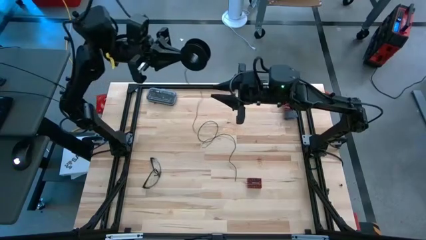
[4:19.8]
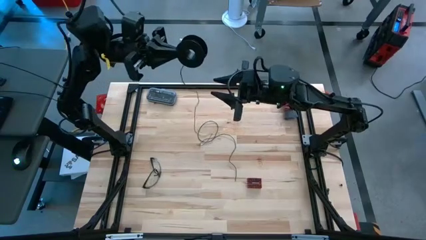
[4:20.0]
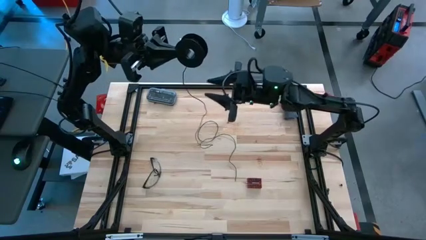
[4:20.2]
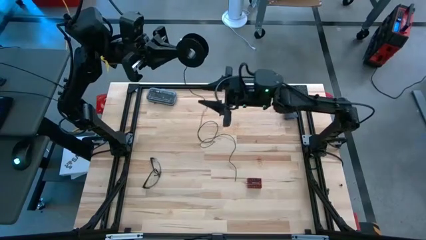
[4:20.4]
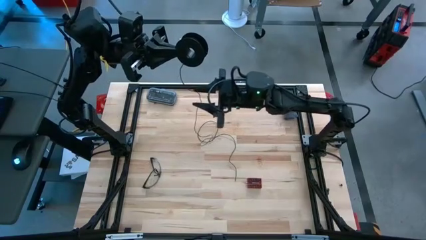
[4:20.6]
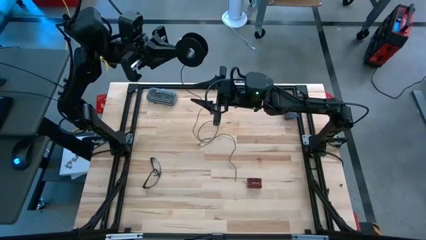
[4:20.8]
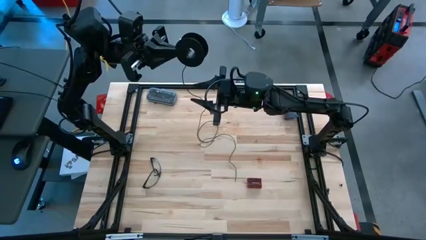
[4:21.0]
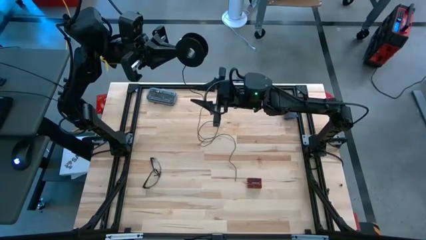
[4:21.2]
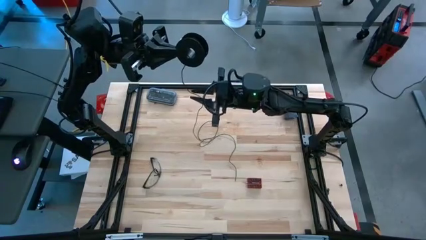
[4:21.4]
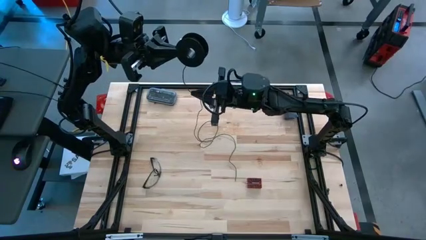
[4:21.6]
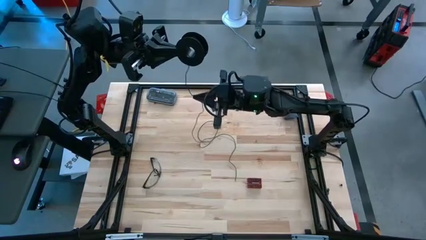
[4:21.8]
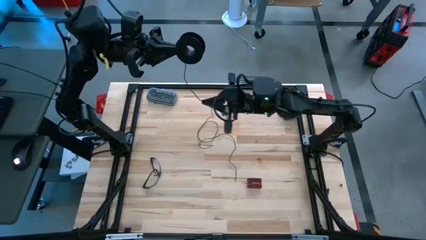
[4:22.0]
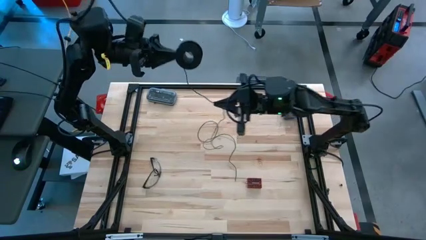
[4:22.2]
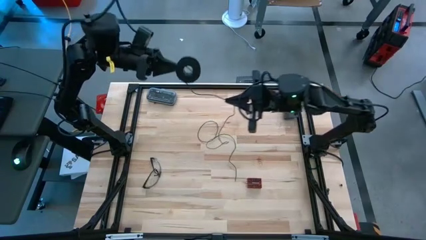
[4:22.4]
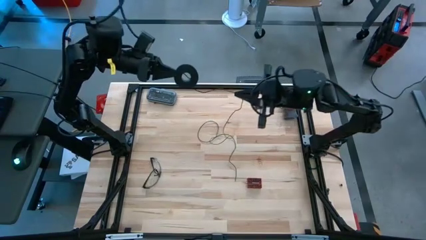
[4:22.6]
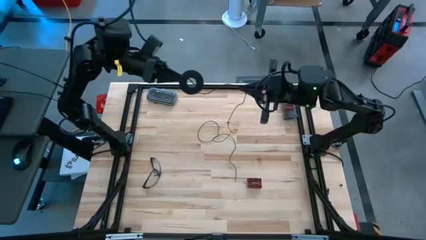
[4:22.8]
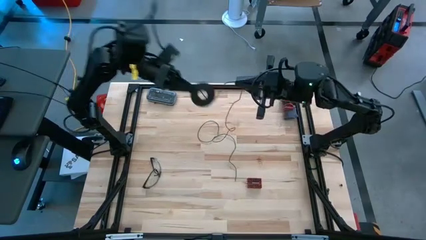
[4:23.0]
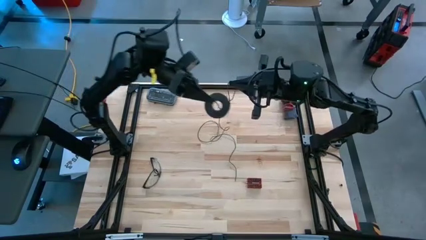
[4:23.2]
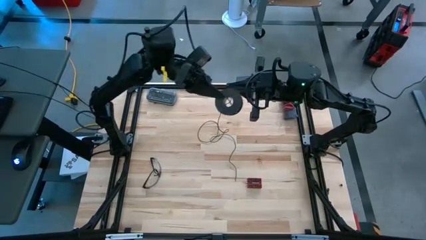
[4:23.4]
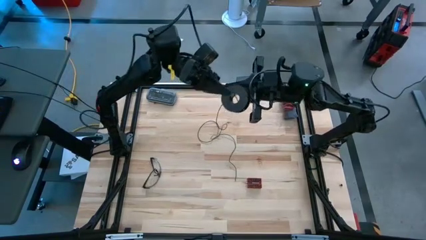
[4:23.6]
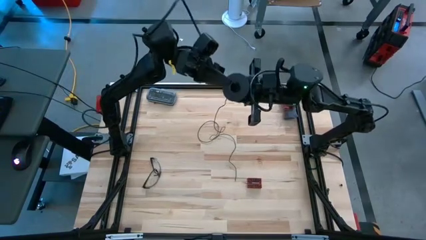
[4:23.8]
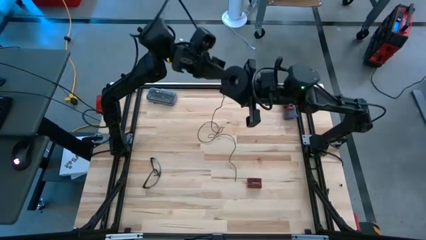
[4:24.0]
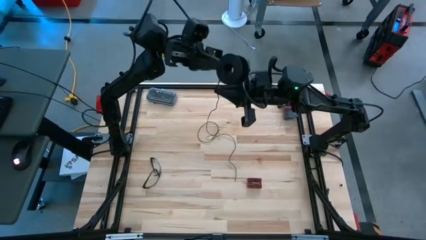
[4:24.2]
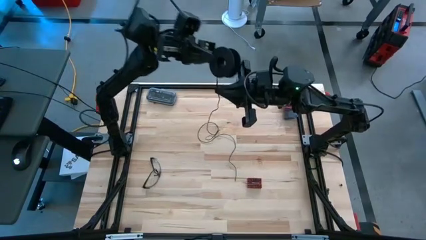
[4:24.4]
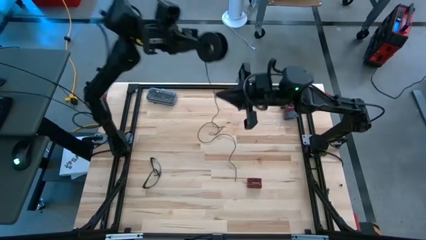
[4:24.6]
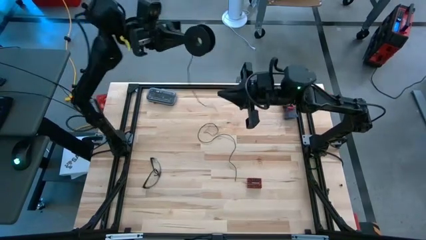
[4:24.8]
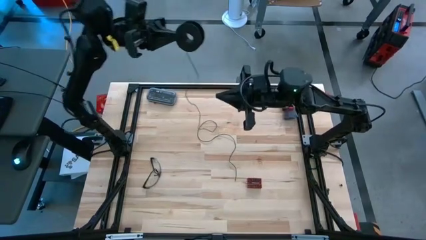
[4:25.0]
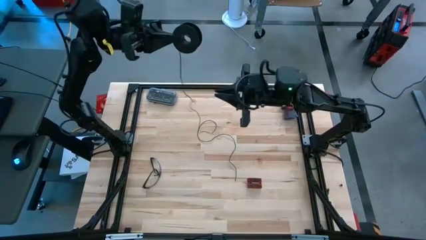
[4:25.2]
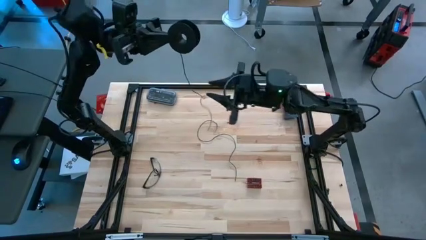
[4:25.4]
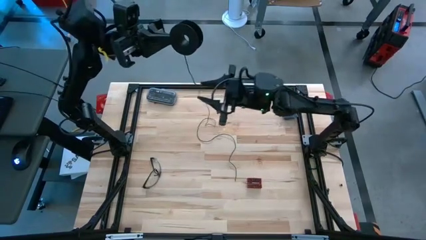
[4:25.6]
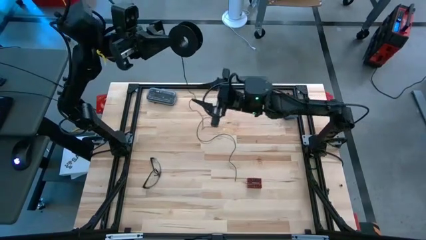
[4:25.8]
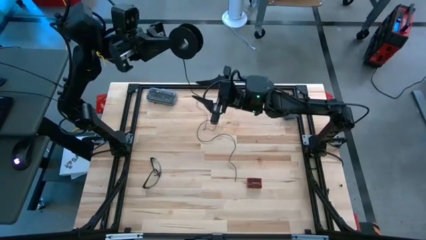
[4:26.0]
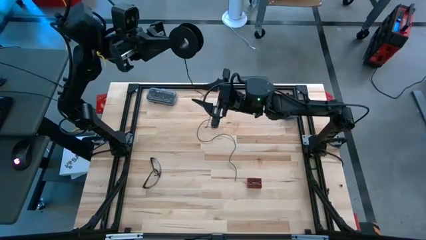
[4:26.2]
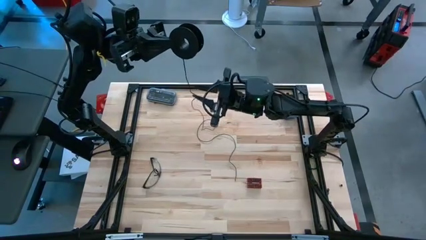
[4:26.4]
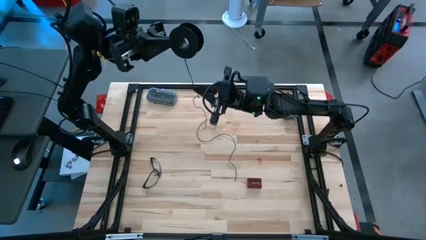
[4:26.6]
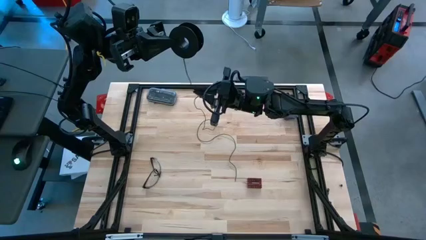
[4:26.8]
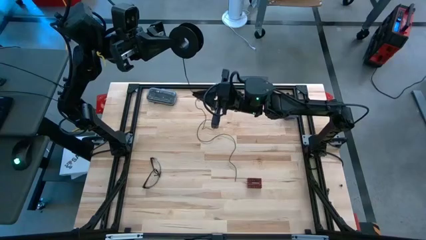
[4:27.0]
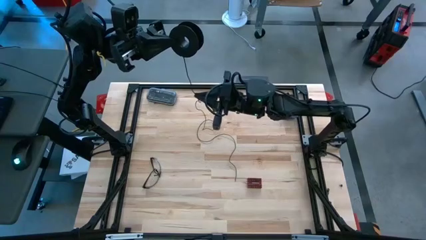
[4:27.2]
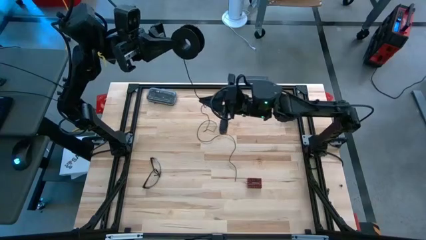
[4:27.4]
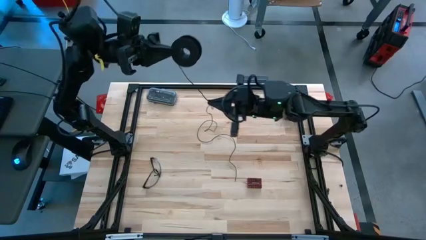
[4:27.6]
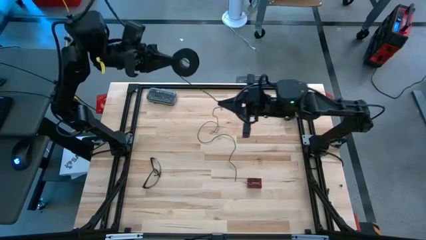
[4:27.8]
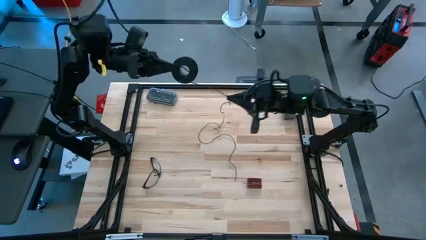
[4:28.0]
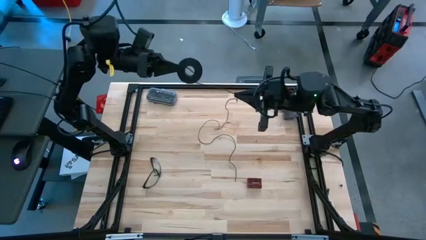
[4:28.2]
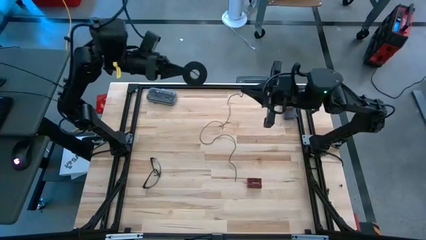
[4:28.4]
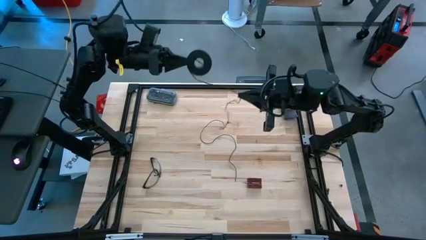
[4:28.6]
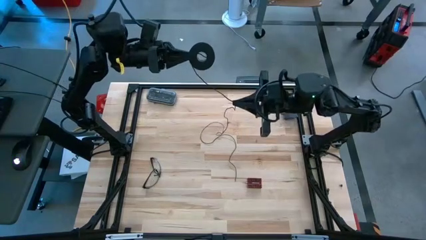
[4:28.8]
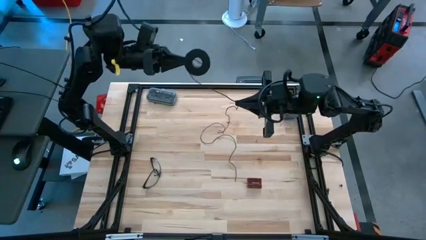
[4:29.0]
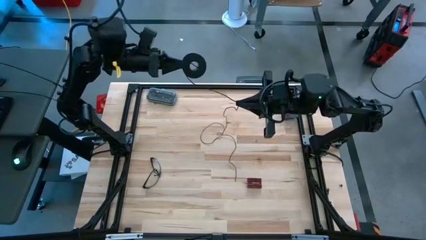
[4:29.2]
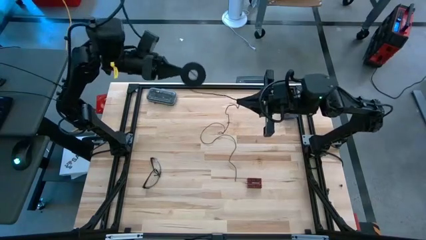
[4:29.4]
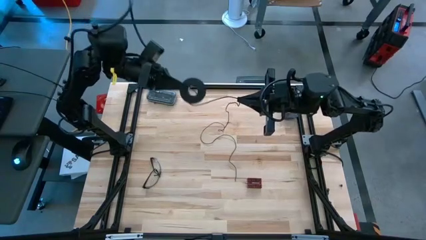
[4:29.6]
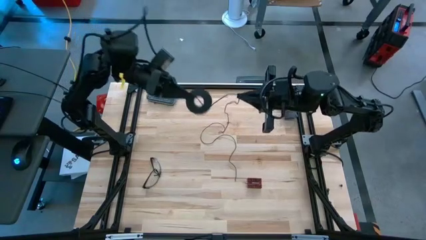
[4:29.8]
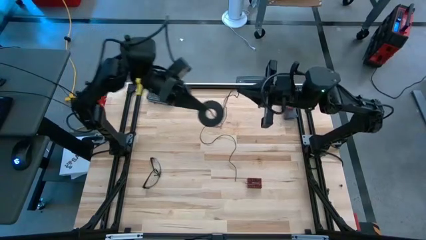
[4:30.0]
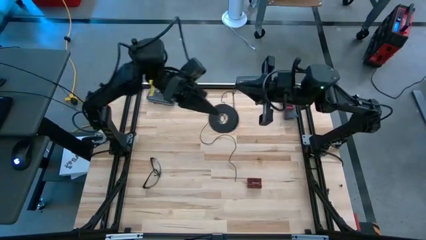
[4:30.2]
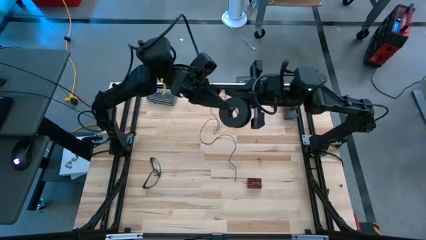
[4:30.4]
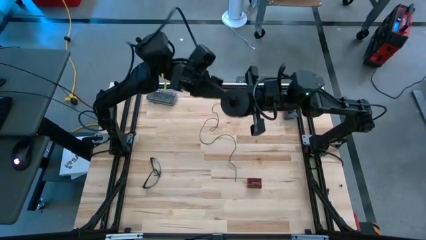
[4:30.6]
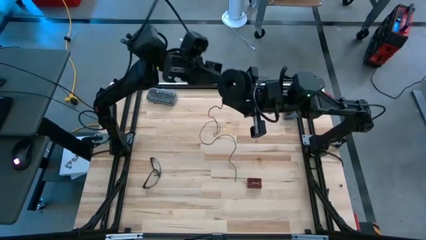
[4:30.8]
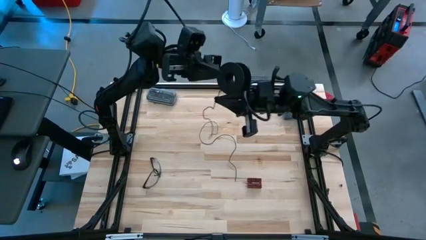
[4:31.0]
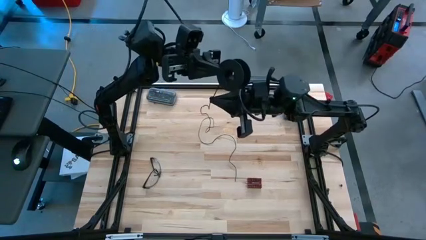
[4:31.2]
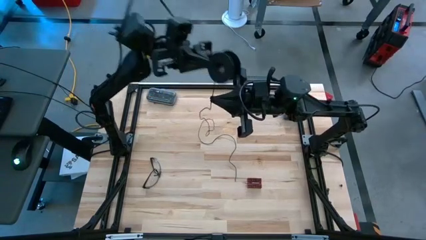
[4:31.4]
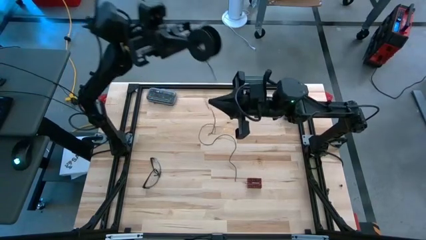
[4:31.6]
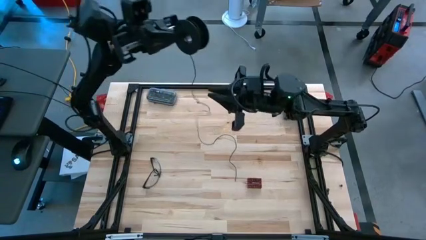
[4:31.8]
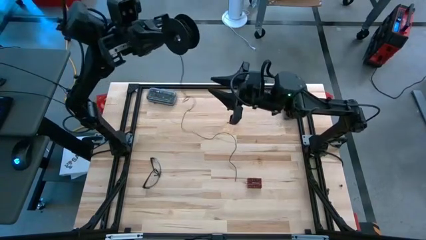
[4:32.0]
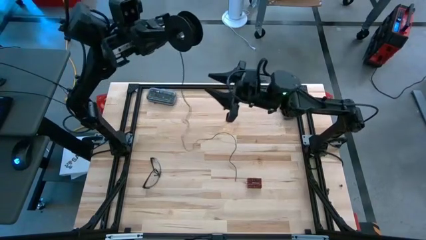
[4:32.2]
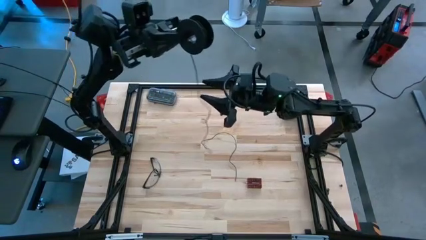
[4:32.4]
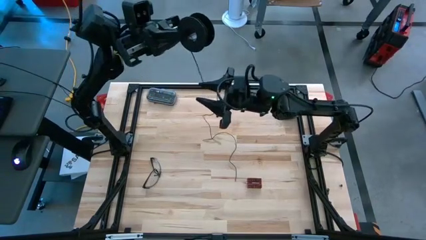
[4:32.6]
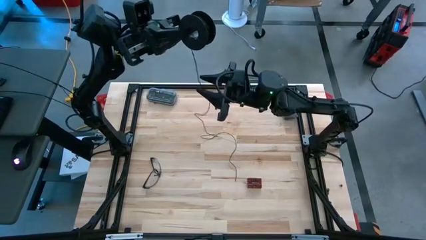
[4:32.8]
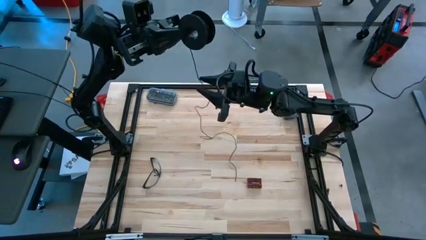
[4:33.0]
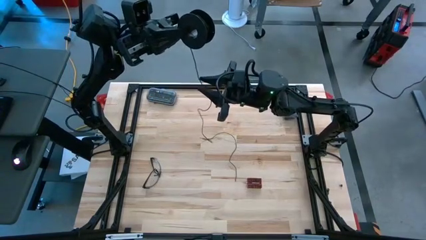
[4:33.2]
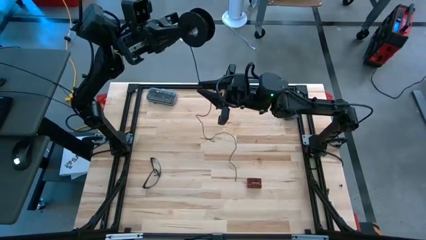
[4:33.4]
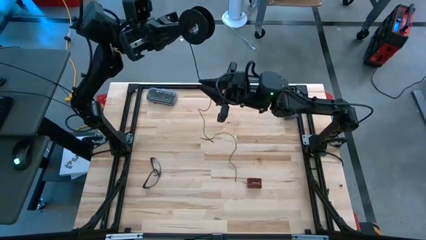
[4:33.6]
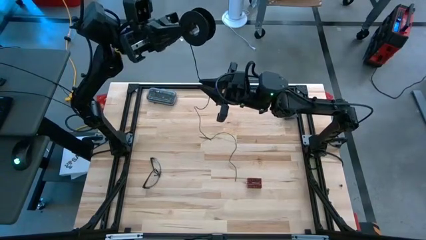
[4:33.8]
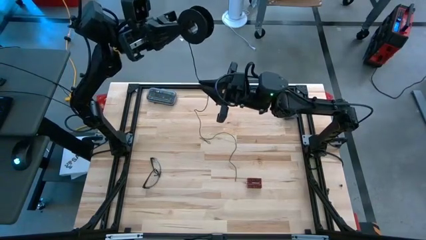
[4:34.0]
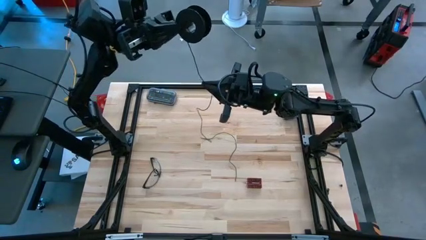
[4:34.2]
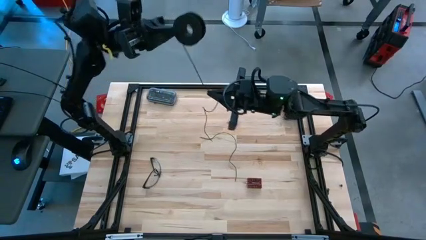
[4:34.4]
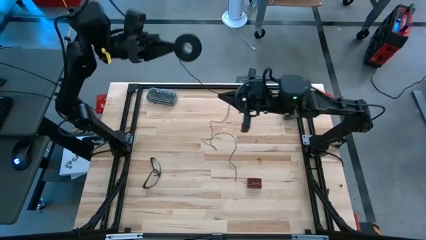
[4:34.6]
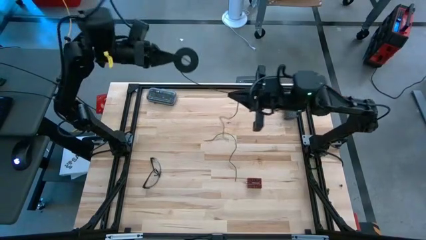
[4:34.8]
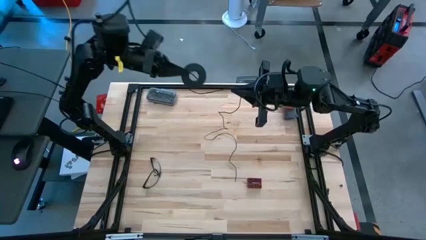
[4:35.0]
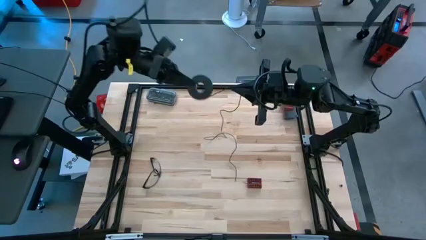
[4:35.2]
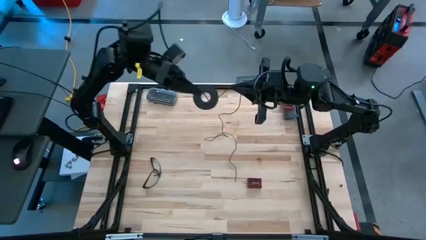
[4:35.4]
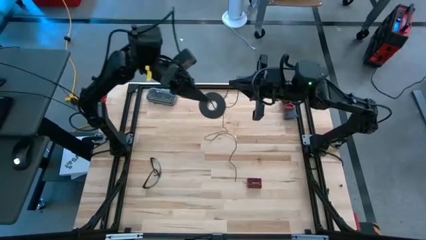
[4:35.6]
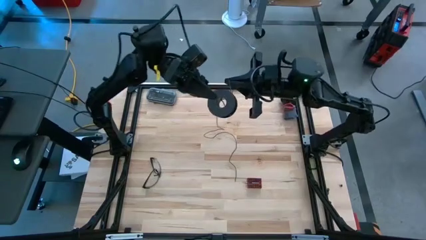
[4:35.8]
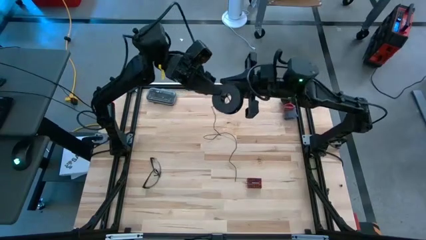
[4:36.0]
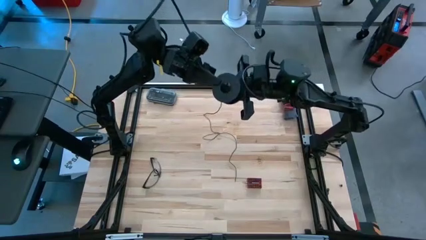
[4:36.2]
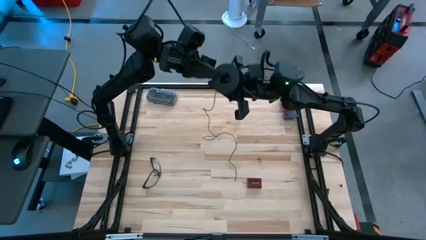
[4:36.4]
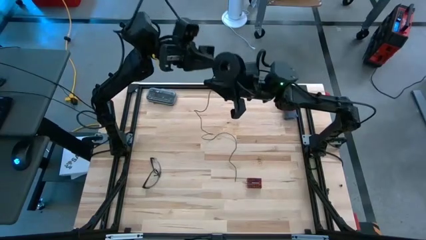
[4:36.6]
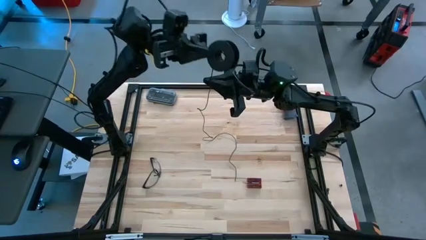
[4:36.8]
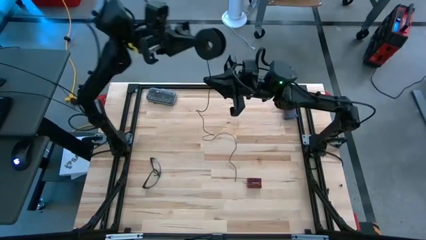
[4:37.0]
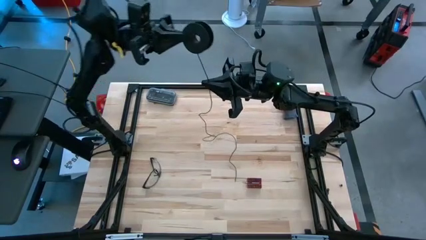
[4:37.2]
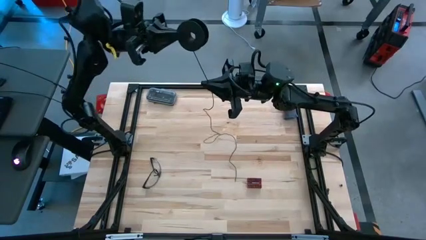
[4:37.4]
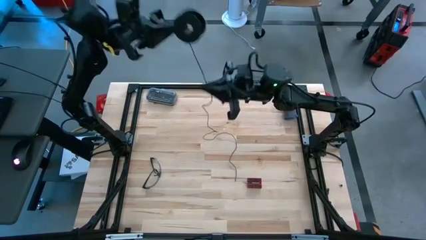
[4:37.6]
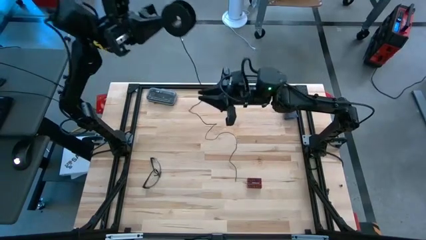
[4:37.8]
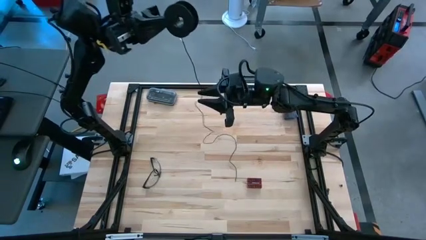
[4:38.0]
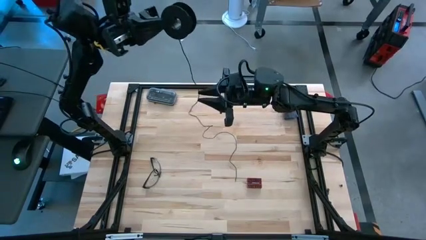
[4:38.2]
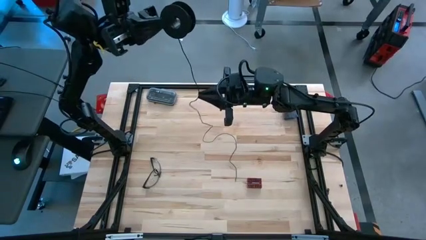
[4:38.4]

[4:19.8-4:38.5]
Task: Coil cords
Coil the black wire into the spool
